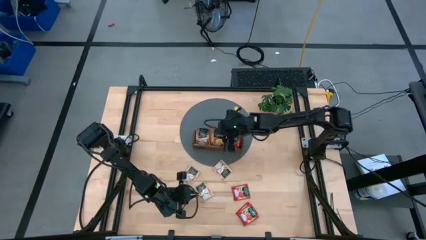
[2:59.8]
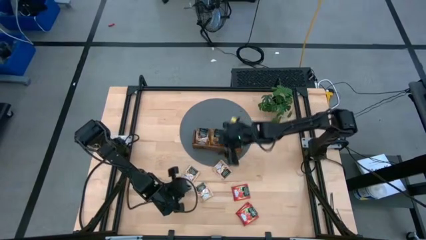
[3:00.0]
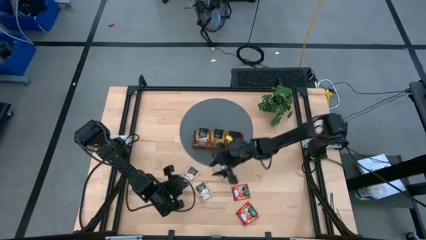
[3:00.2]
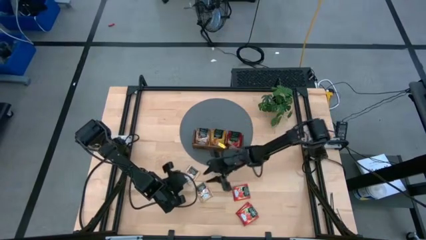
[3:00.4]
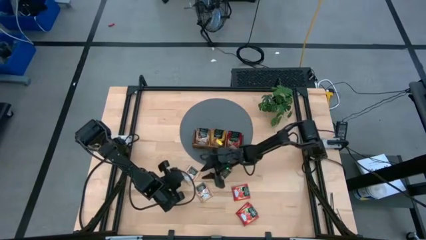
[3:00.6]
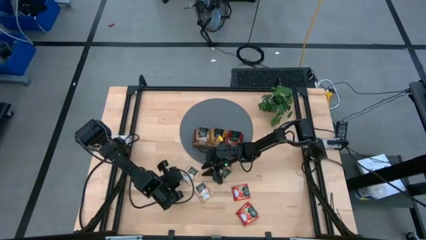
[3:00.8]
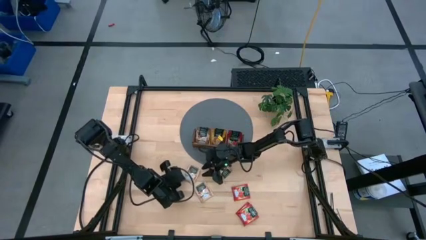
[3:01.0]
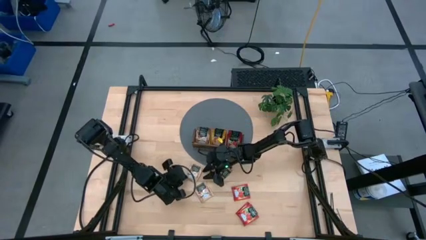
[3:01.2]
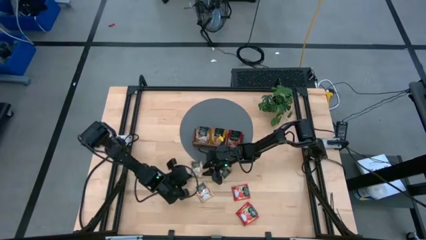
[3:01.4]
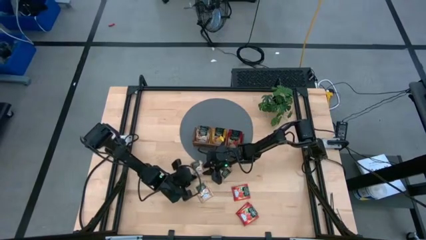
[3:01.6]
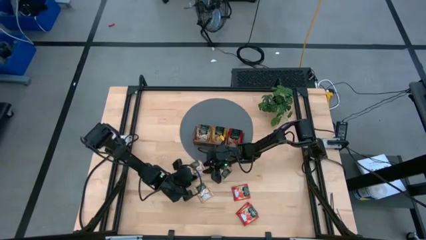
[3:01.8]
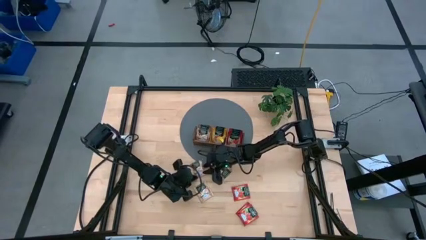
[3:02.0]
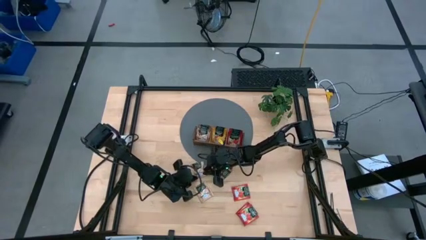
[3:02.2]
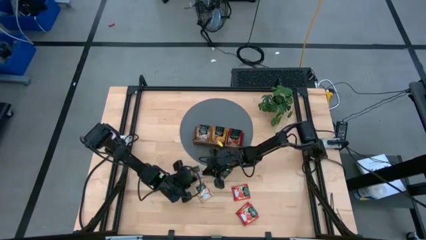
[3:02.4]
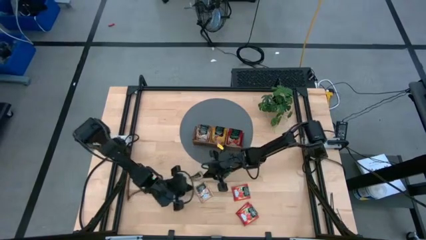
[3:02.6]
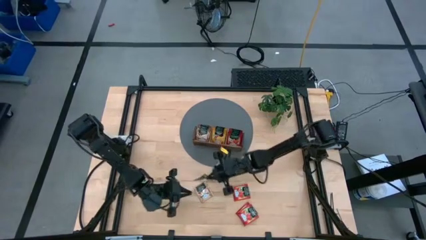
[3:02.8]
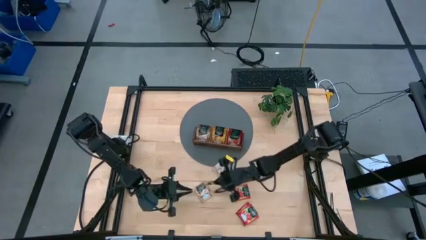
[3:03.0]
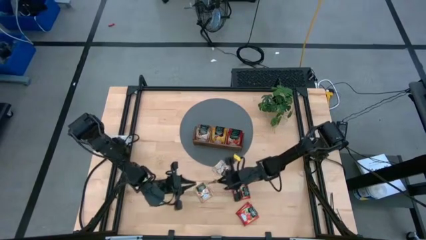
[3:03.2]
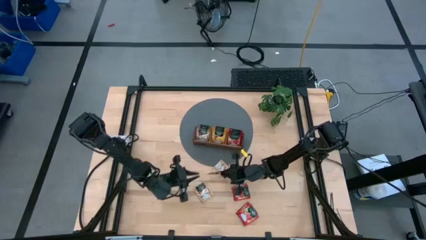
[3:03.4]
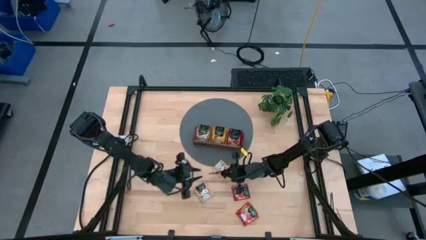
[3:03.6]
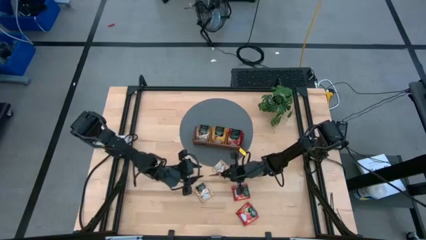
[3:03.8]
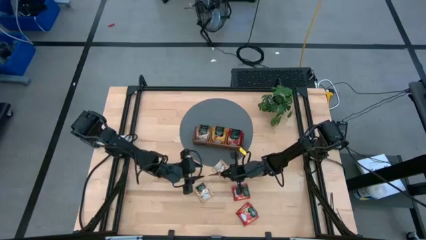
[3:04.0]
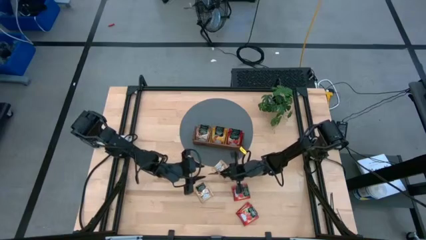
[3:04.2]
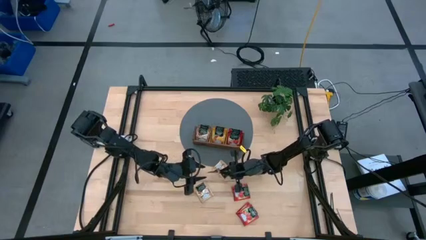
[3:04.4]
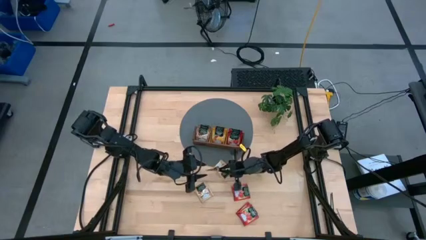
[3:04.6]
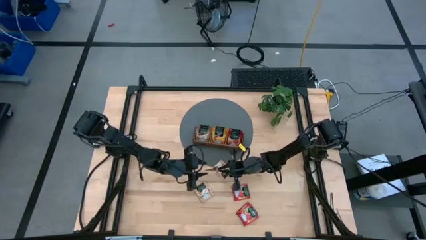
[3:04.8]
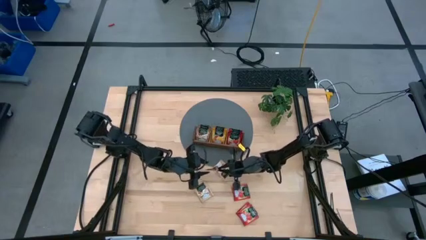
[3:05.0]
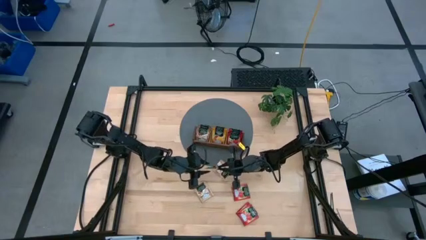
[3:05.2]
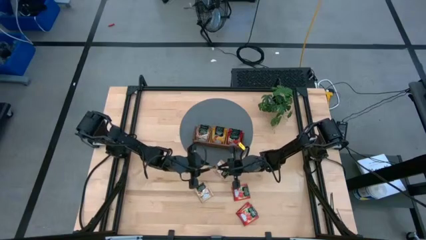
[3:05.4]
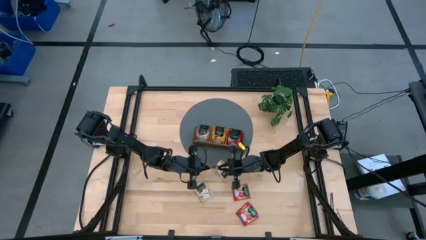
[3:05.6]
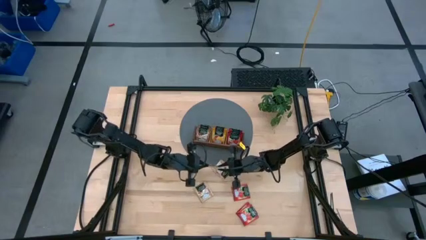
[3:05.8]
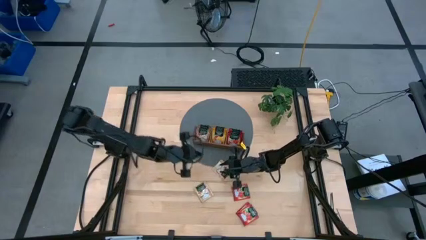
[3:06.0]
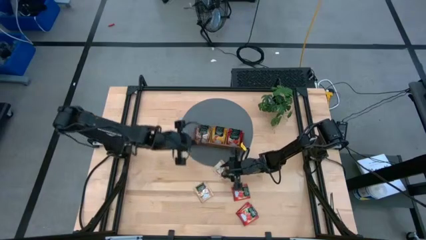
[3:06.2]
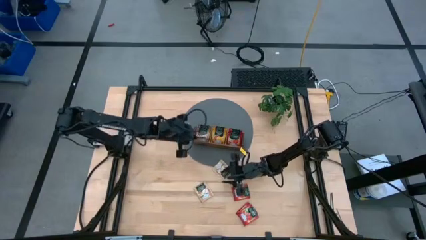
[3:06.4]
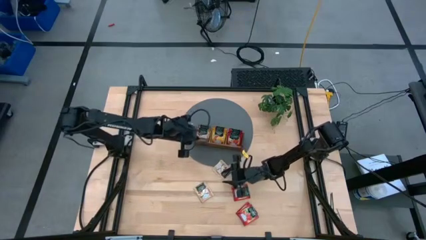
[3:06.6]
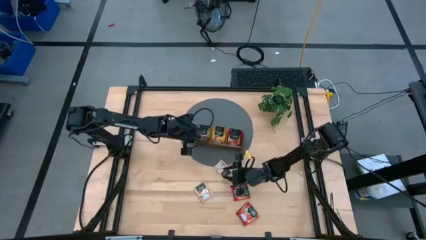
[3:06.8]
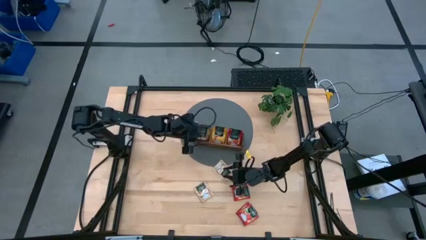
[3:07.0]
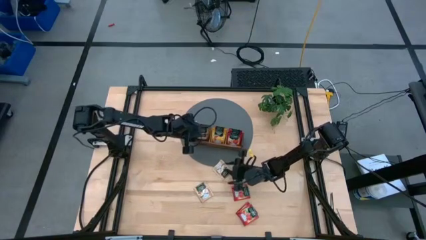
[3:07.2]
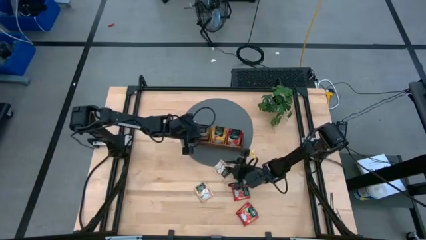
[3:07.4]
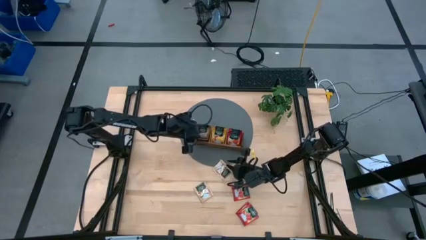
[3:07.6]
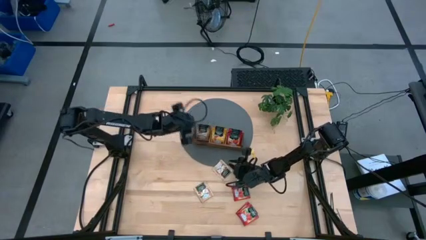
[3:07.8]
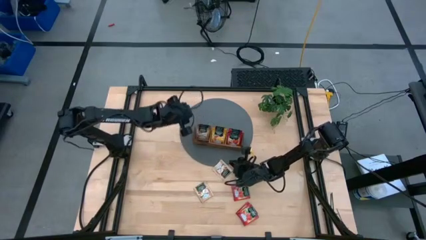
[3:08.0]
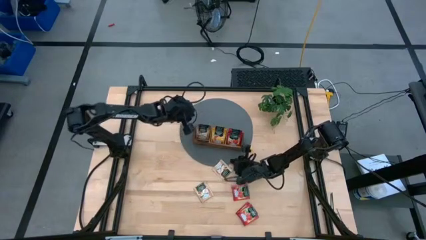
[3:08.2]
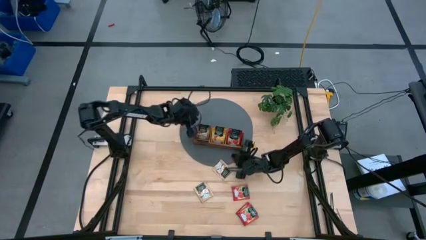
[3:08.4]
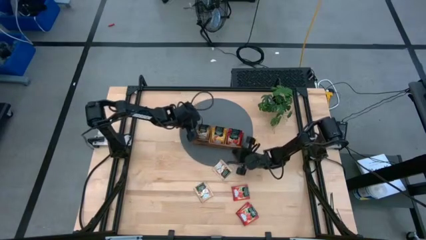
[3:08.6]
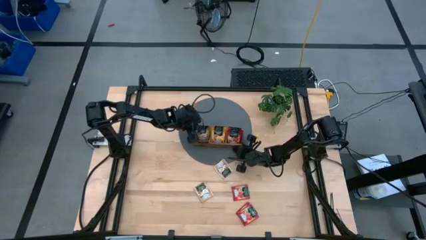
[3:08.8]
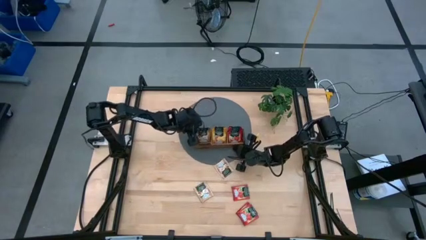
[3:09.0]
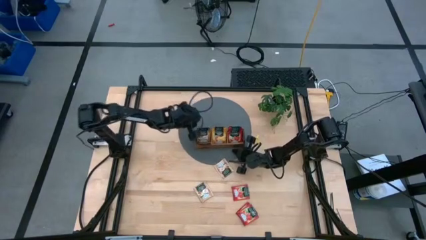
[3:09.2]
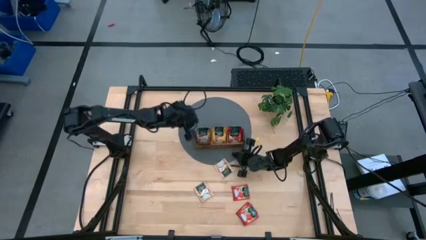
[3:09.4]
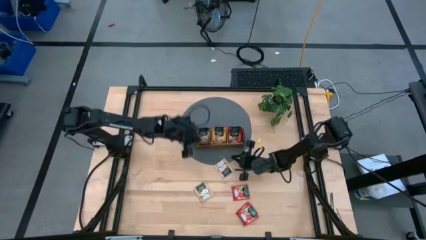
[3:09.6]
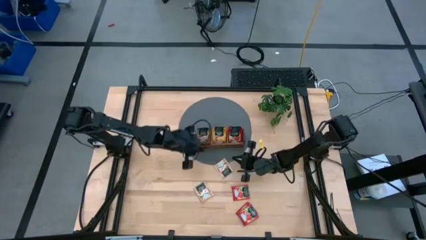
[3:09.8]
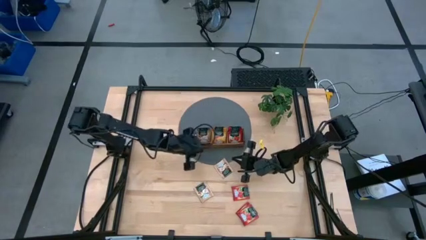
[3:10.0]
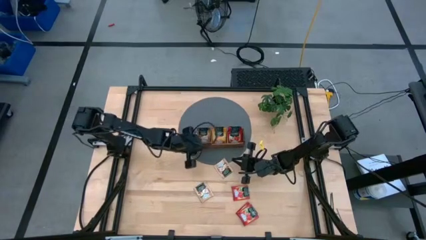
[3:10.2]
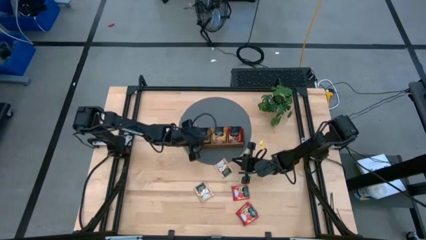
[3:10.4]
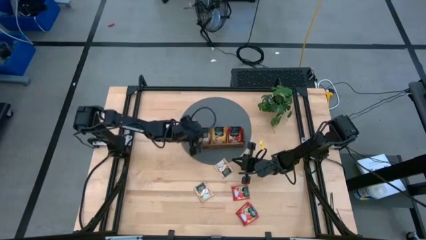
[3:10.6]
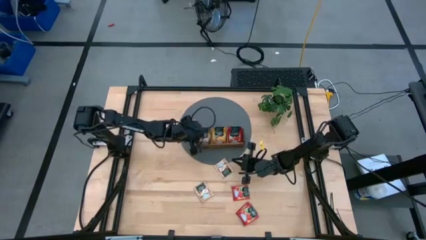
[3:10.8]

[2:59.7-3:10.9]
Task: Pick & Place Tea
Put the brown tea bag into the left section of the wooden organizer

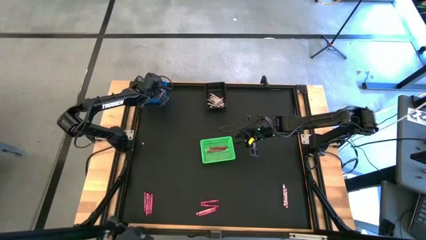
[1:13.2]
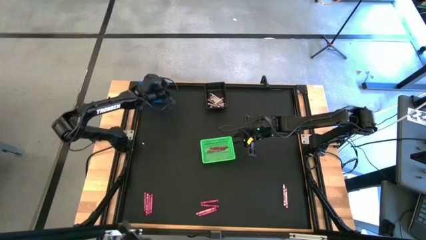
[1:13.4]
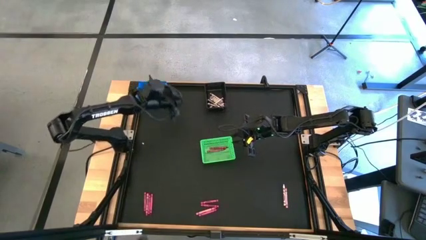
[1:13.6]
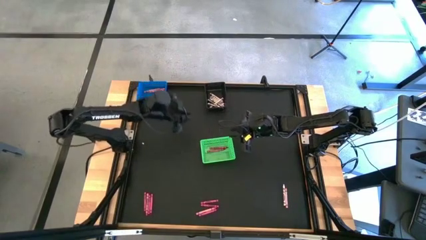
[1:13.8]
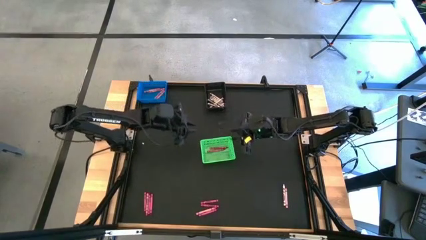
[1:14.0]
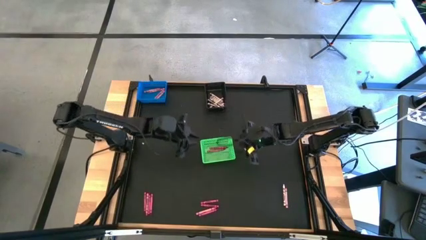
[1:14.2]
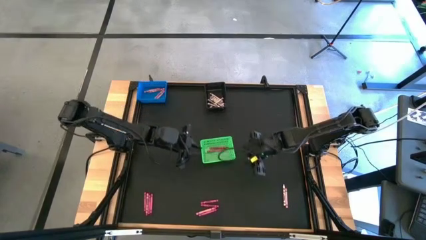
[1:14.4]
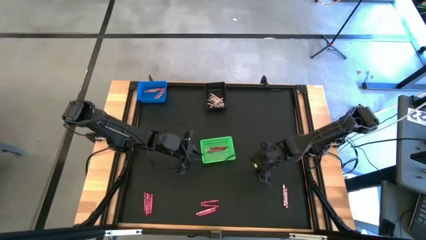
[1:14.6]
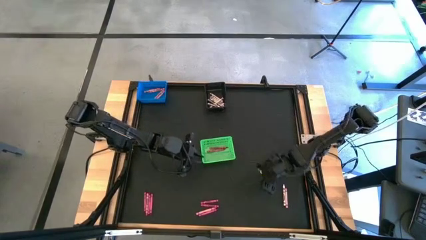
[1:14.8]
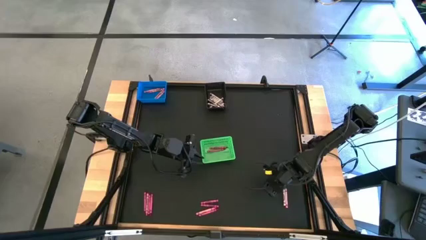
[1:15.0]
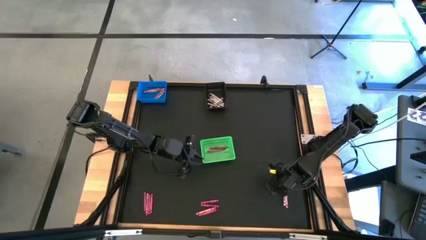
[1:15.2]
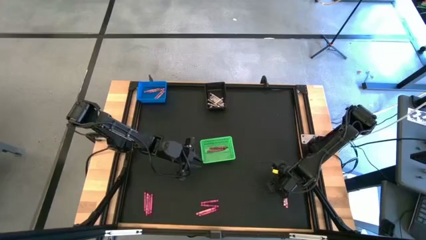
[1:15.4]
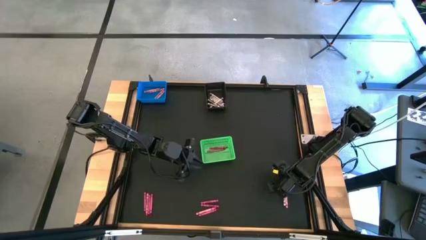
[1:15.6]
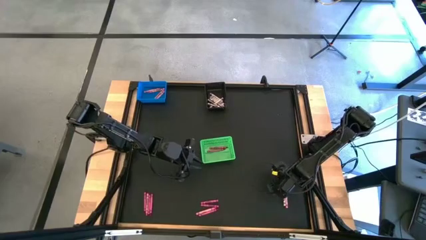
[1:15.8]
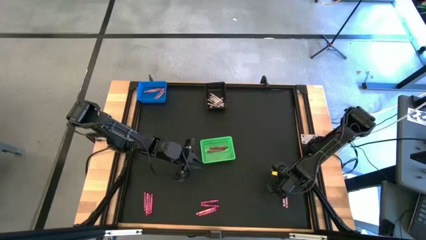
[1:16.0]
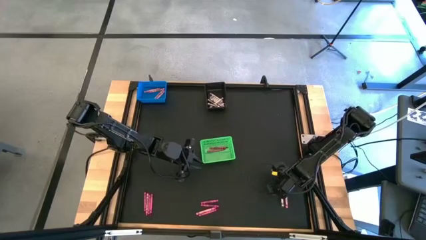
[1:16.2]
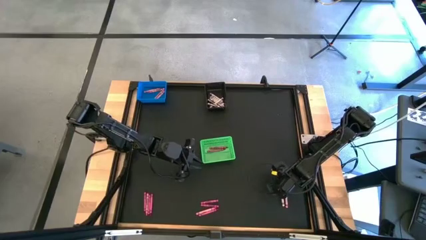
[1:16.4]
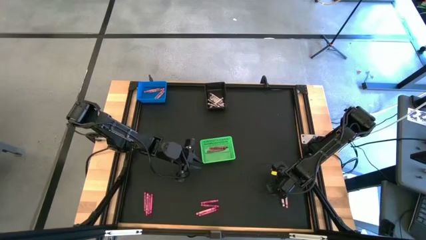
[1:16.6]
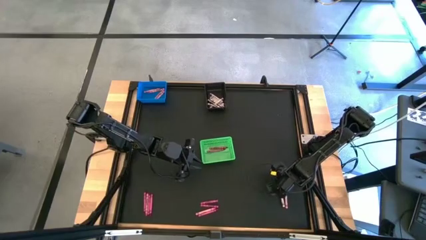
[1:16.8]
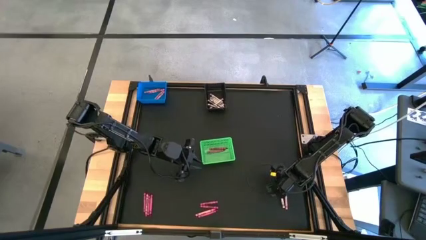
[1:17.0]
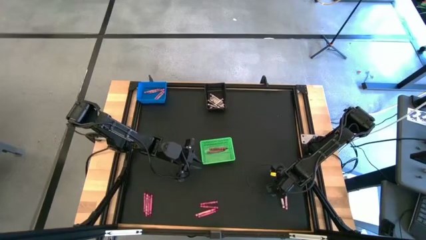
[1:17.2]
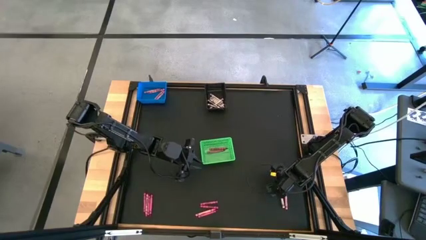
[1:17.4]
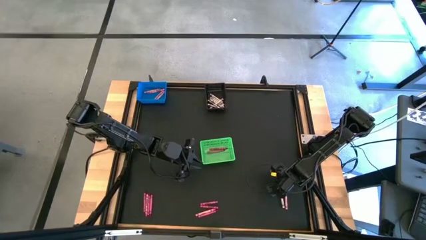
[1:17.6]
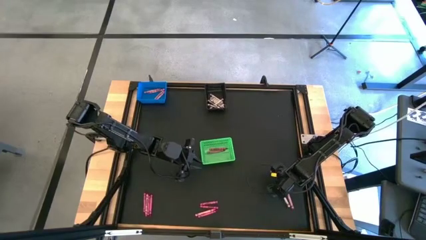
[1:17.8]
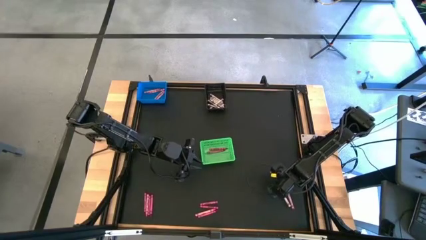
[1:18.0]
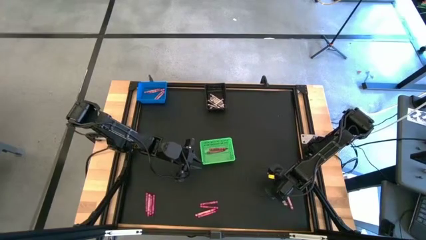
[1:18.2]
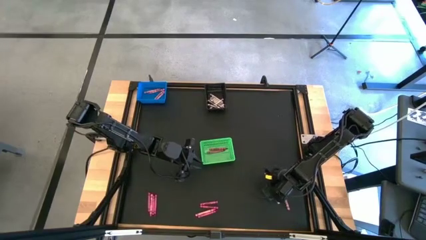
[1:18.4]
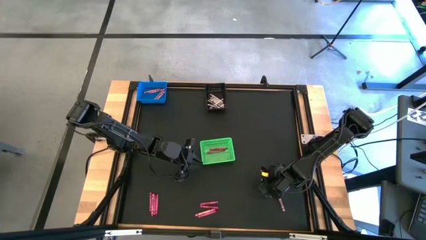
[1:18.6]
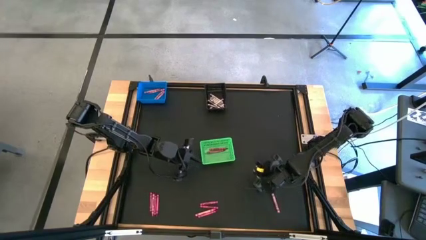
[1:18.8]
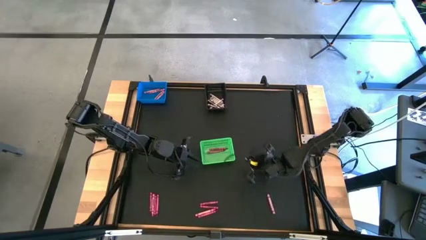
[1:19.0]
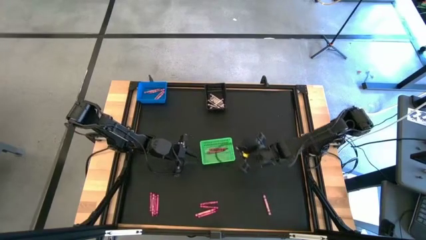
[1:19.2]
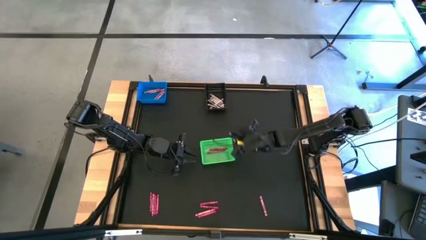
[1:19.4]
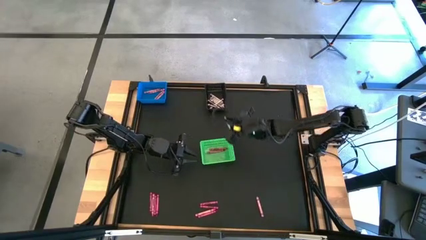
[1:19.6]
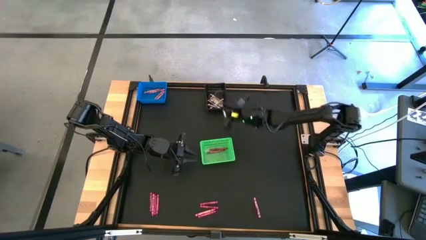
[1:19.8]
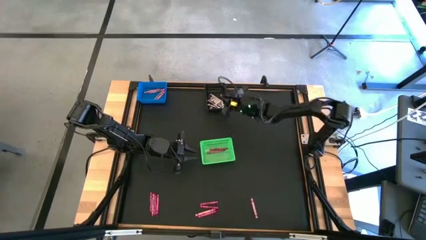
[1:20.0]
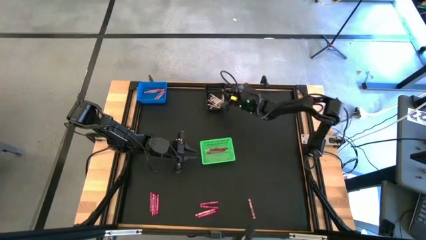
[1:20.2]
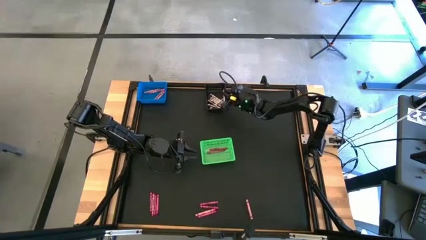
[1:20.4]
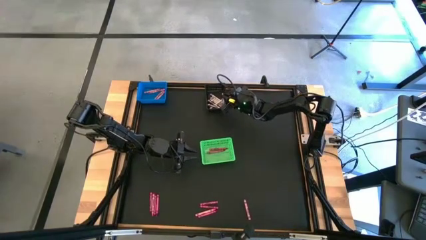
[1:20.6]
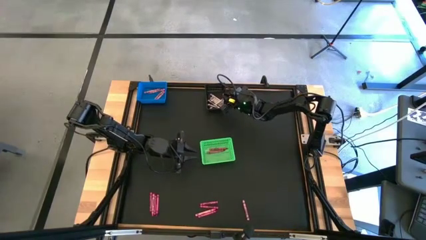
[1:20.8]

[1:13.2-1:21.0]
Task: Sort crayons
Put the white crayon into the black bin
